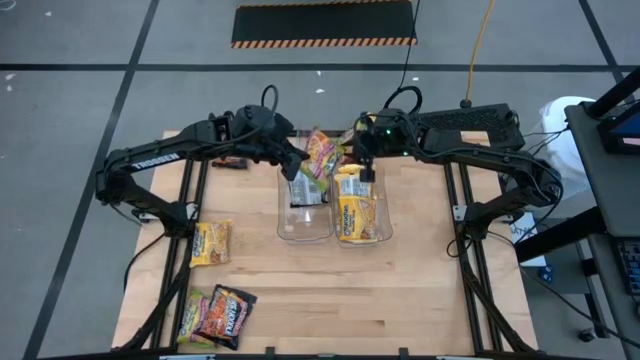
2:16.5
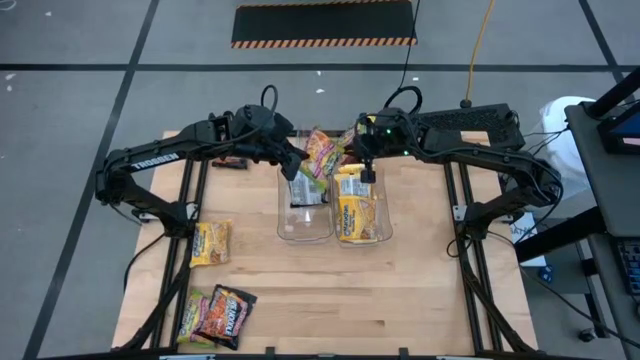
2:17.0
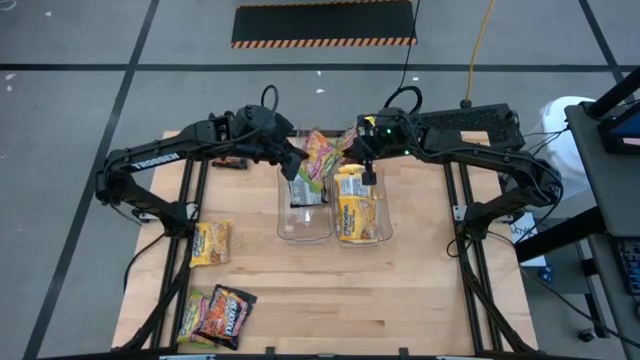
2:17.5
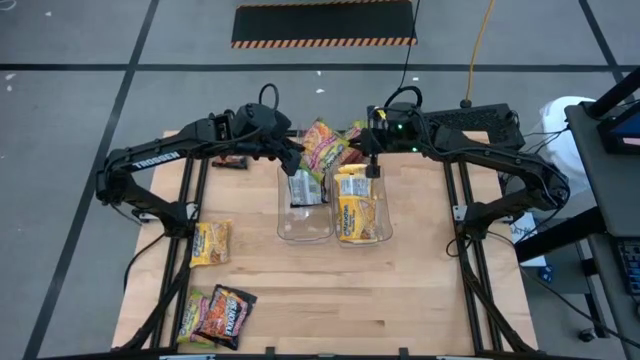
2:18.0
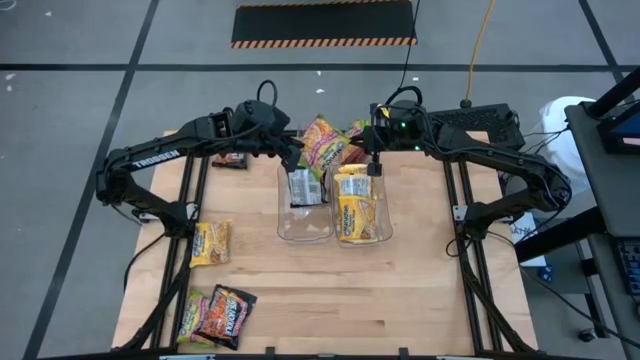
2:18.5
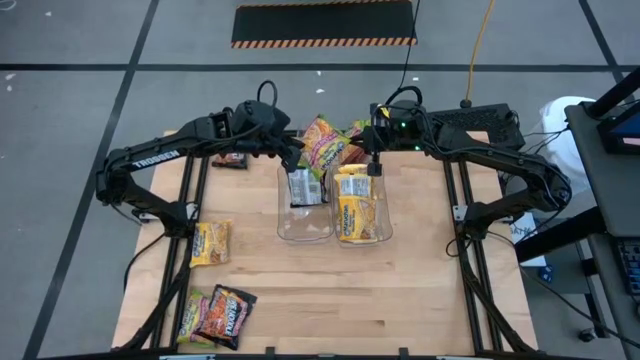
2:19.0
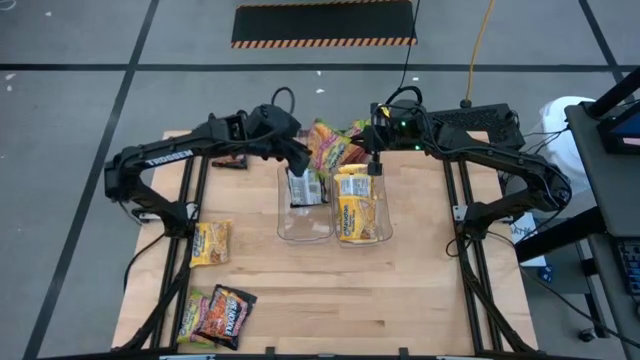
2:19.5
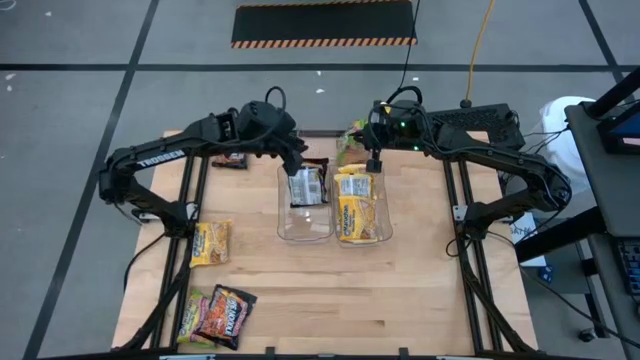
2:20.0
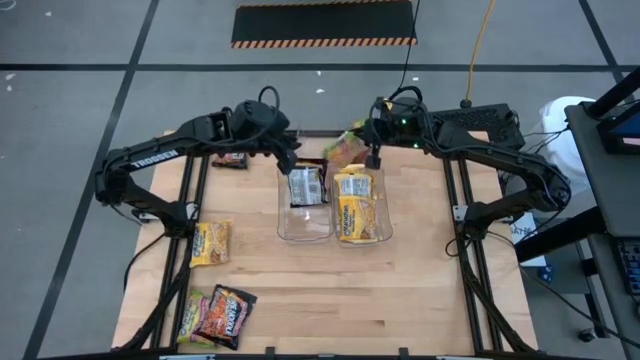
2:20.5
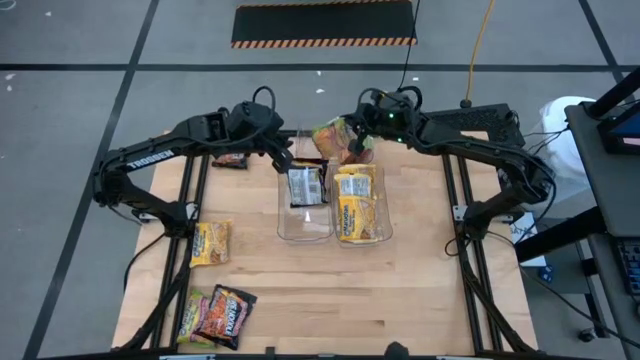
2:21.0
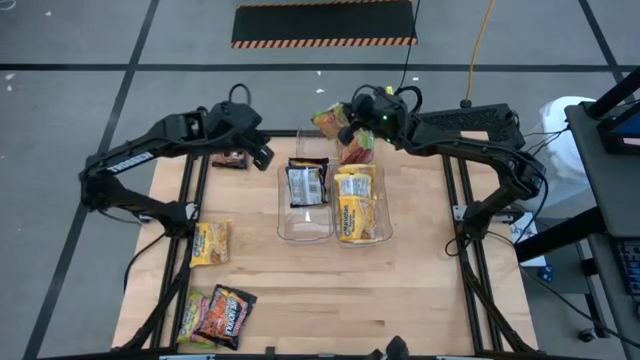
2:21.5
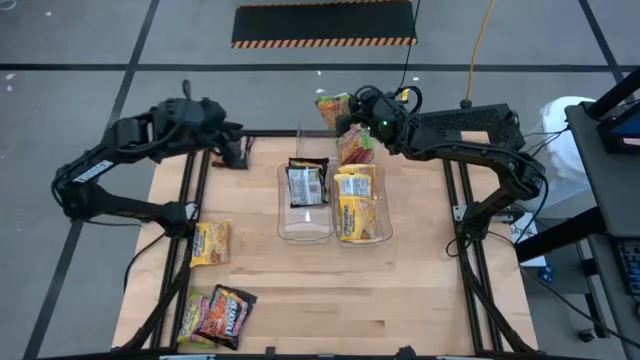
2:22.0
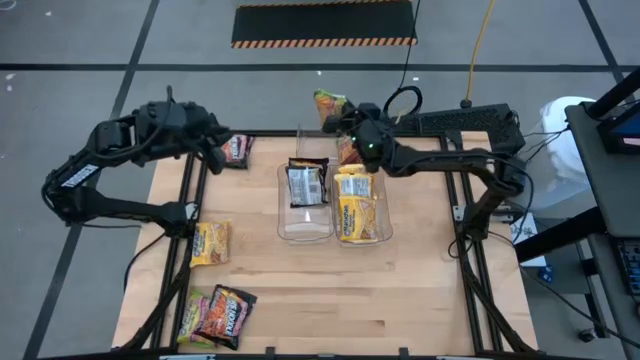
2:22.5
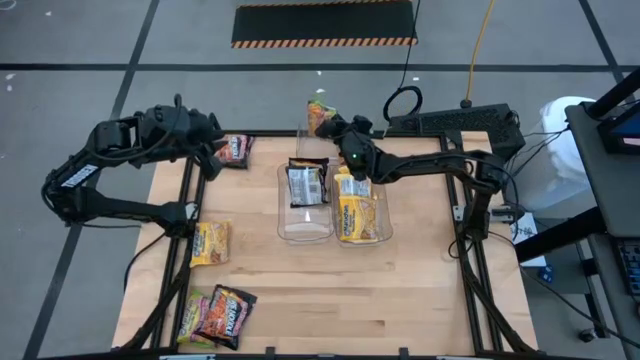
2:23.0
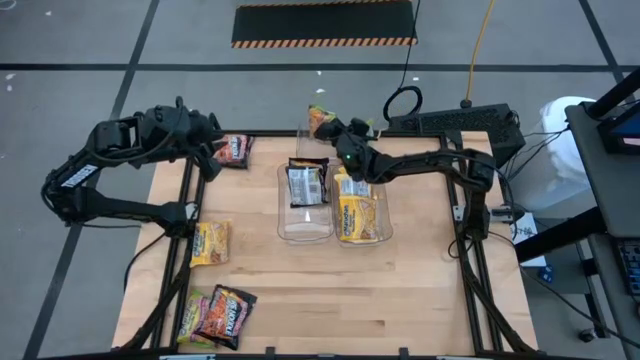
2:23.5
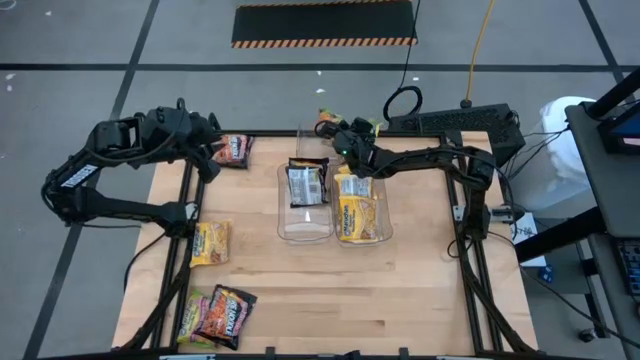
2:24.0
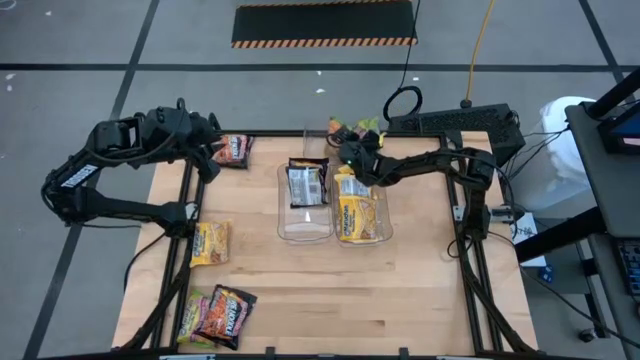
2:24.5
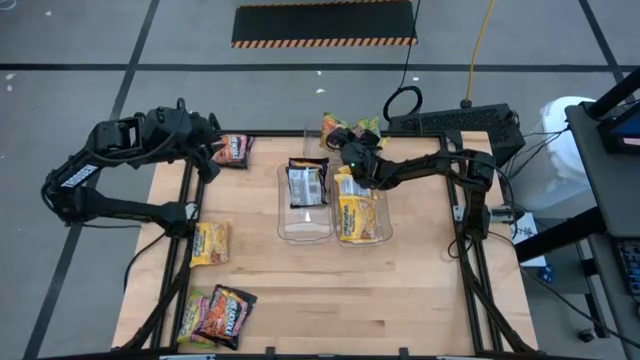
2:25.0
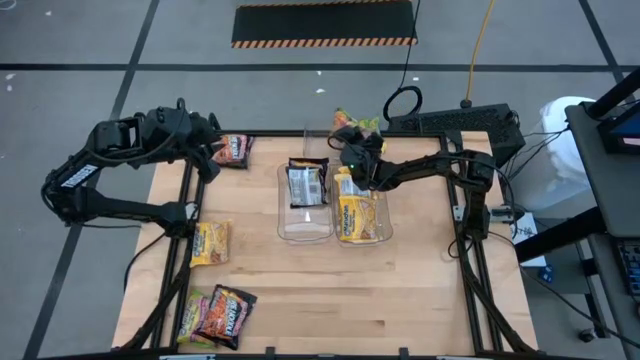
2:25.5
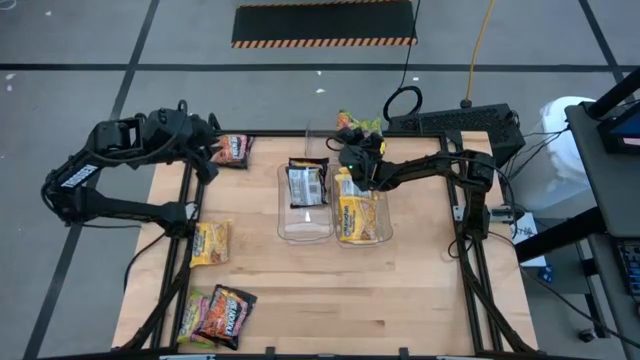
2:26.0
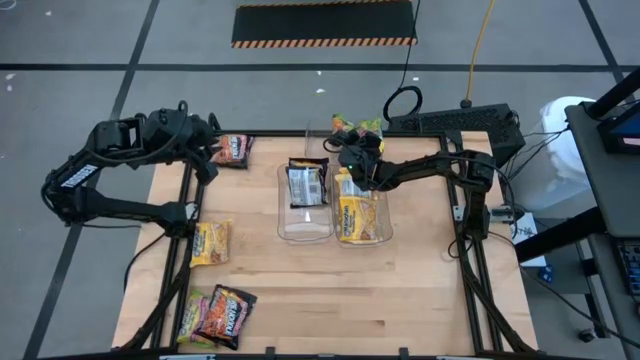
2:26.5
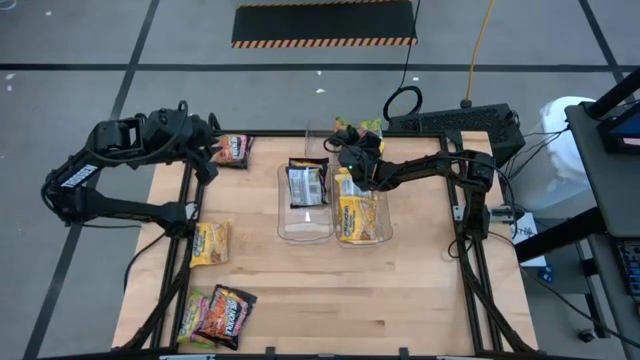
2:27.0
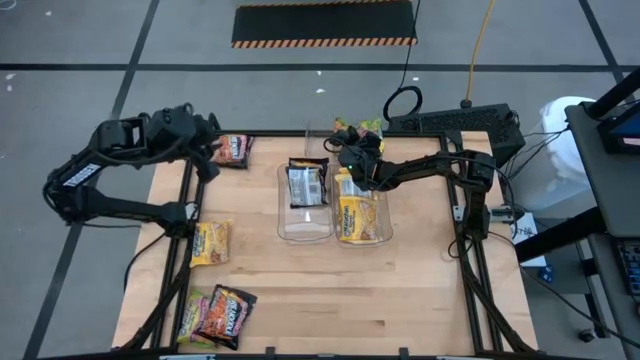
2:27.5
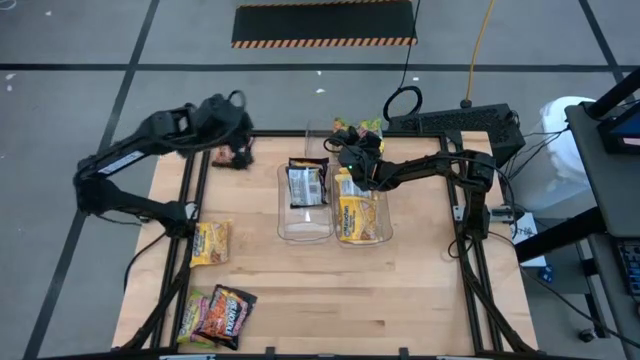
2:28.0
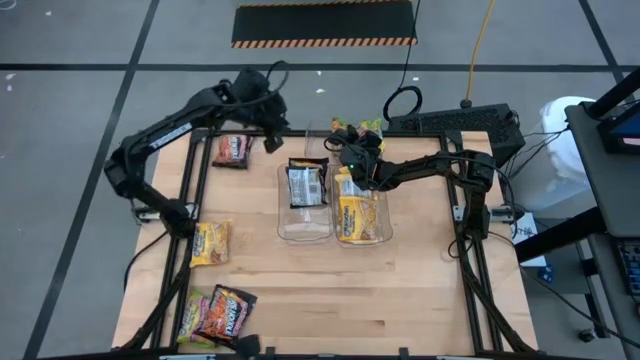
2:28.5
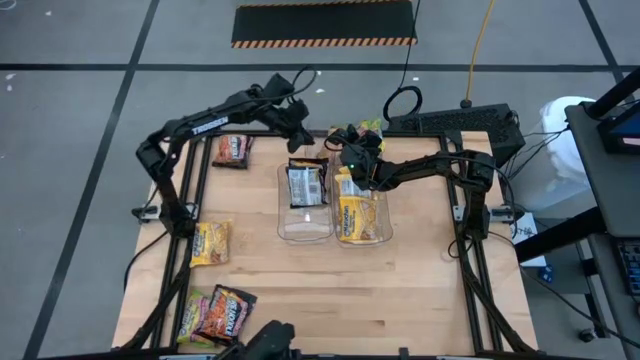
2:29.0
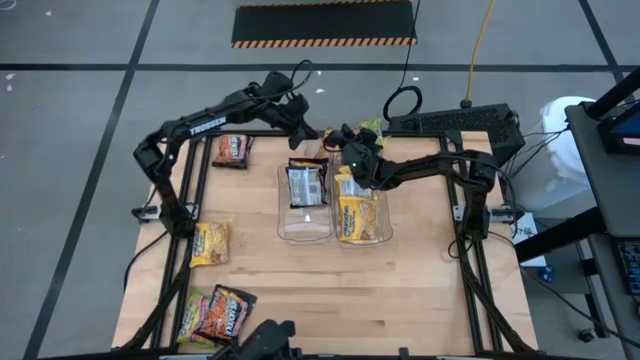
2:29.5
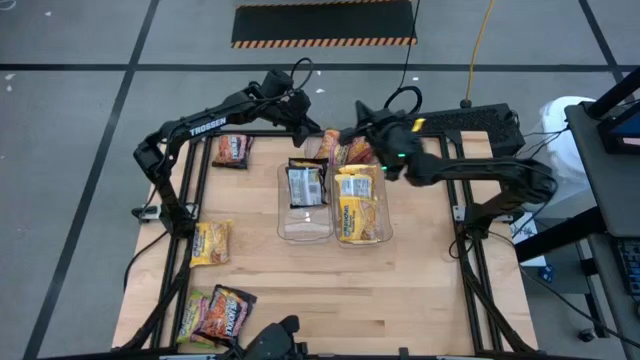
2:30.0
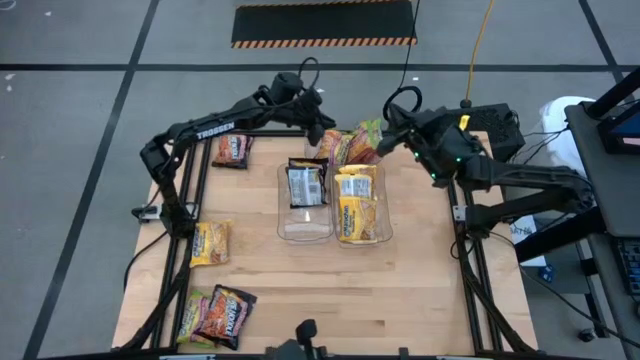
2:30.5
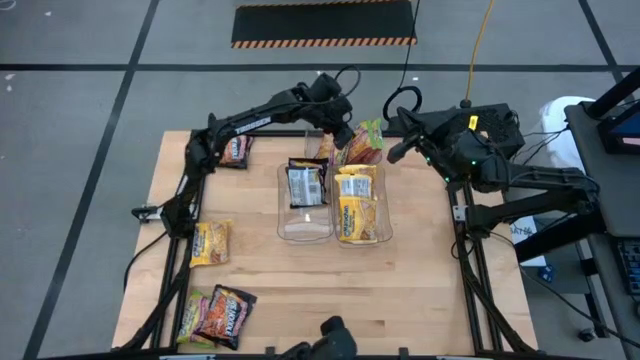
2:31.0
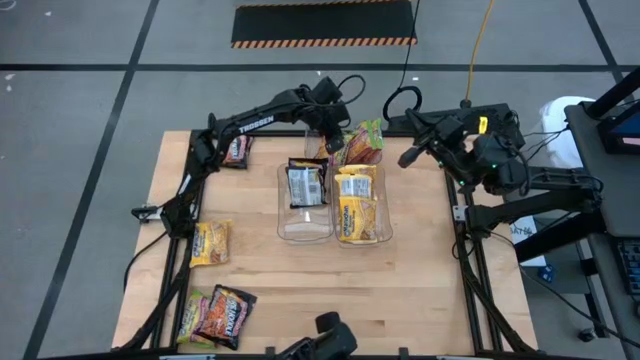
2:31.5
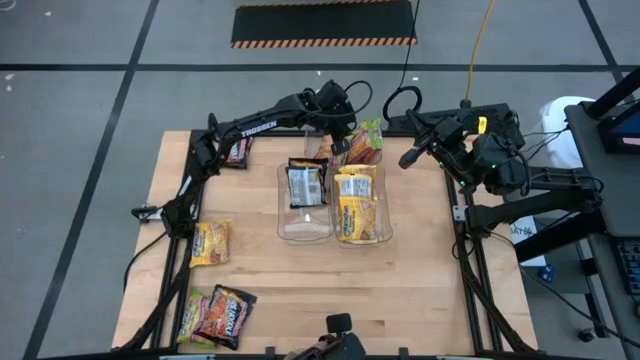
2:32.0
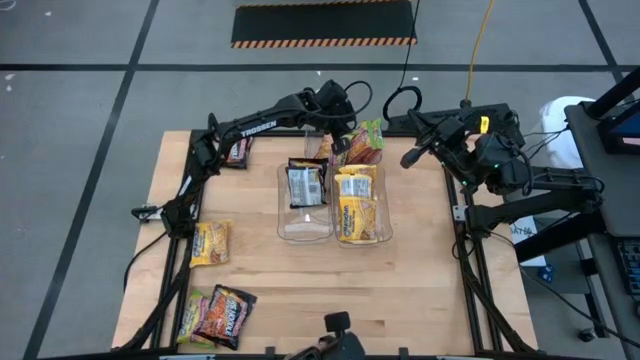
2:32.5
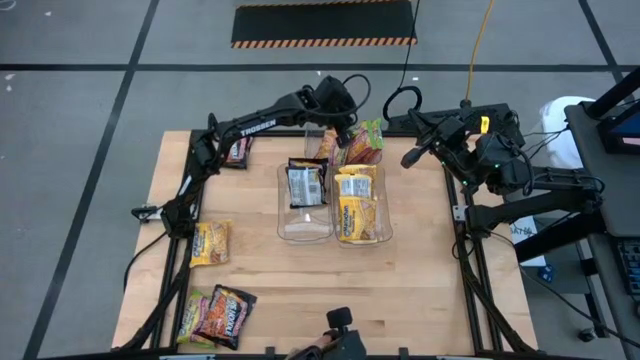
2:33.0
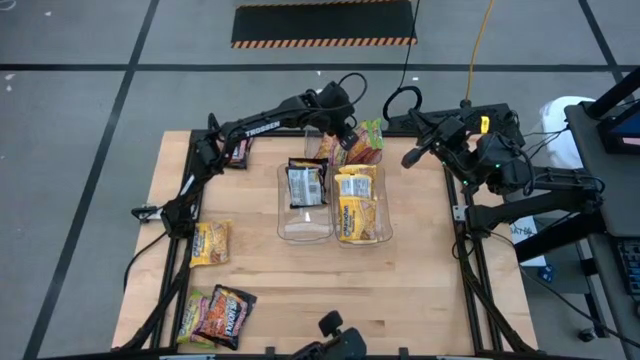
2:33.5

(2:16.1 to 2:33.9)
Task: Sort Maruchan noodles
Put the green noodle pack into the top transparent bin

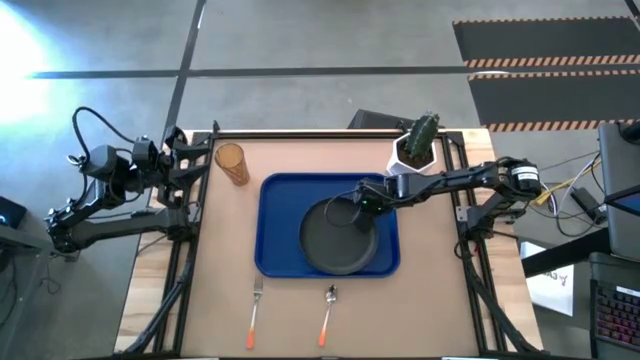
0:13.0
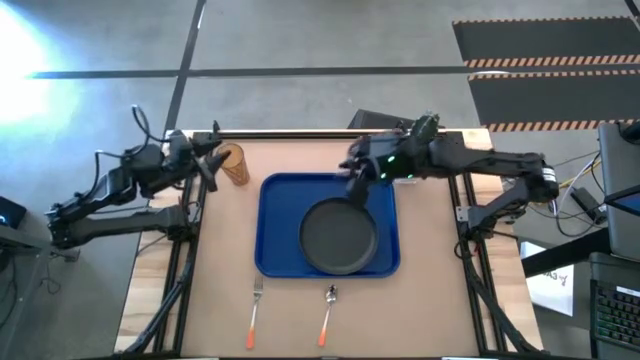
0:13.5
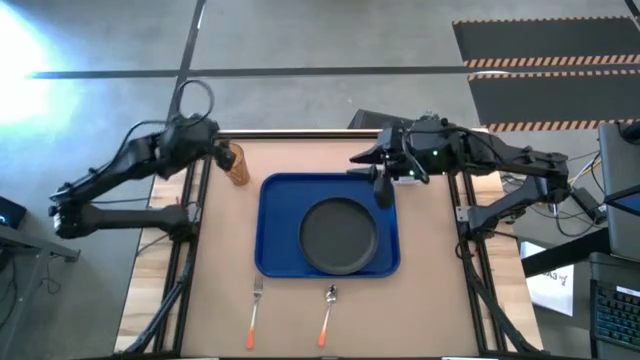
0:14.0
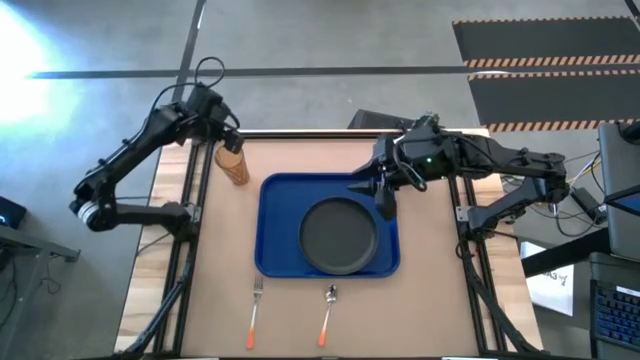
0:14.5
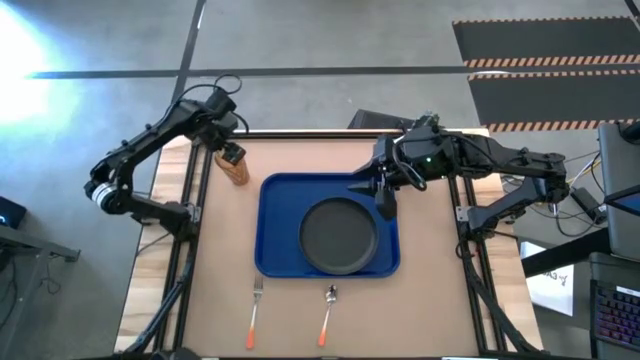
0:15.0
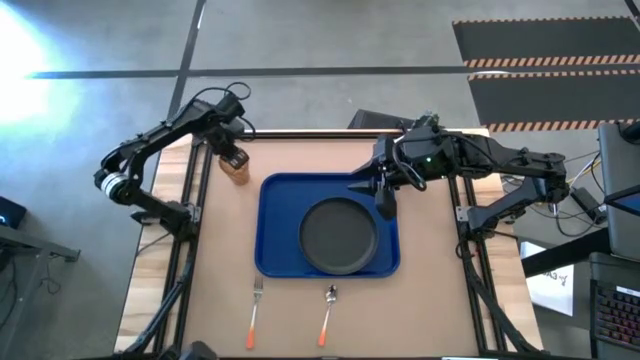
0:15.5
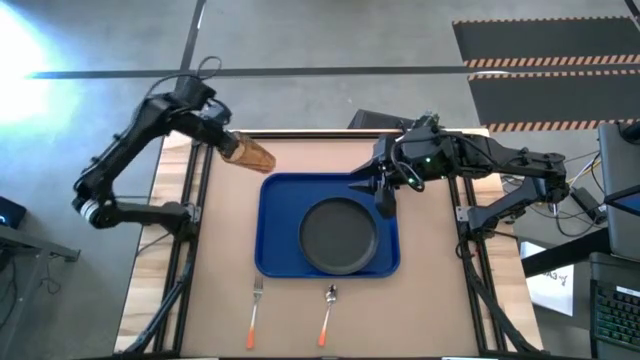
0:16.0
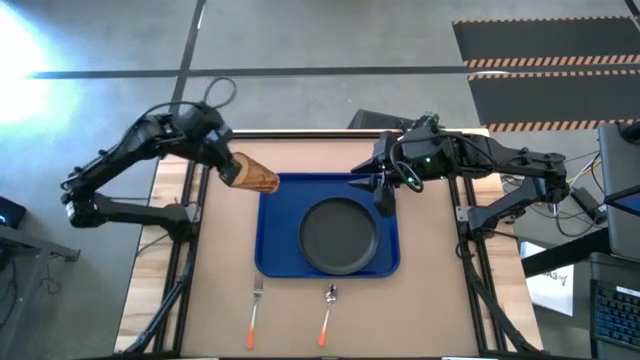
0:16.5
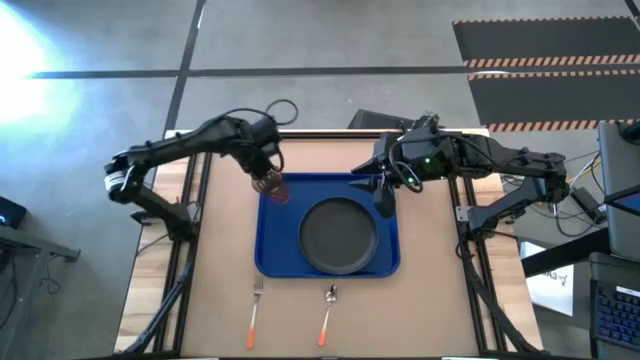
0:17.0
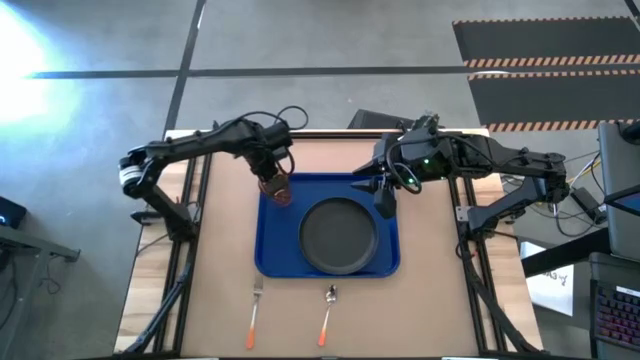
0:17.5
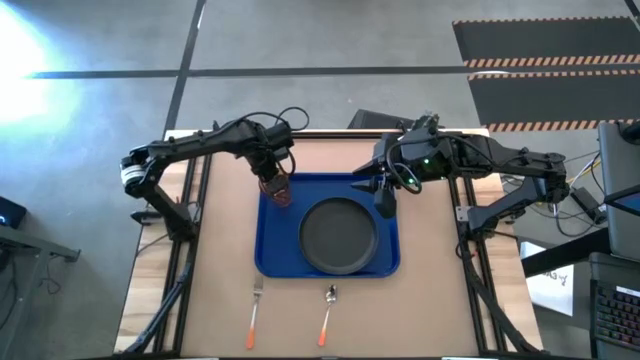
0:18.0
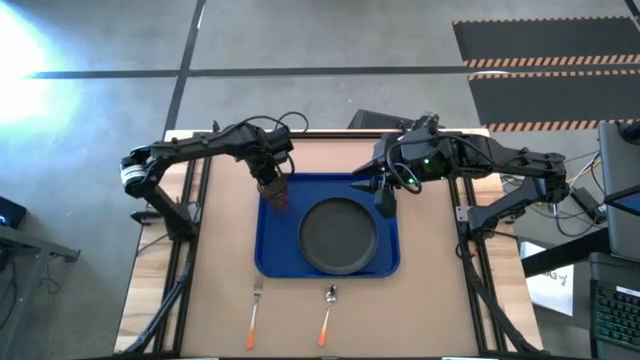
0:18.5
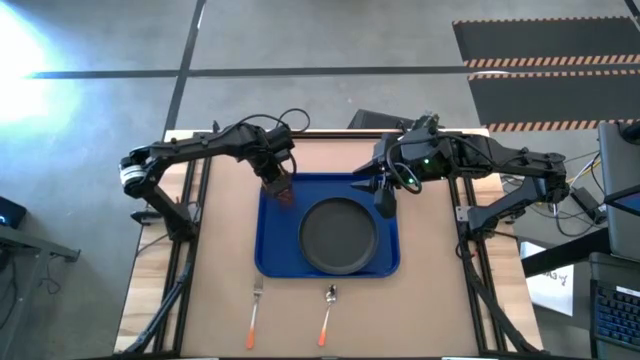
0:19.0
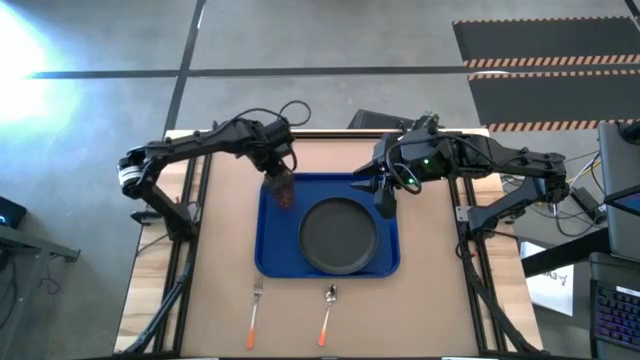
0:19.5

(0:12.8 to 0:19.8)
Task: Pick and place plate/cup/fork/spoon on tray
Put the cup on the blue tray to the top left of the black plate
